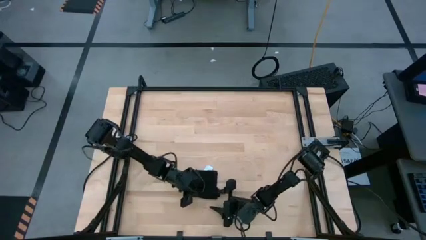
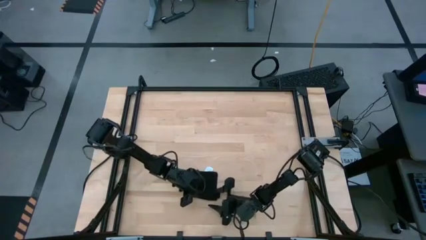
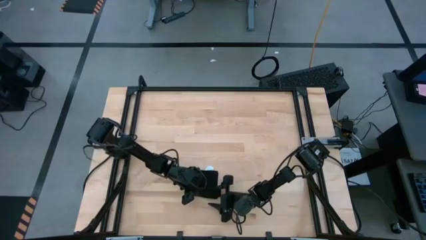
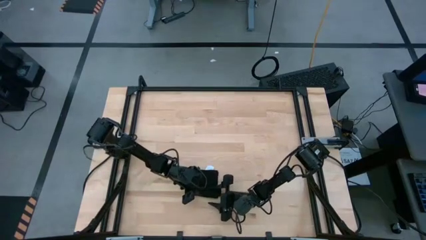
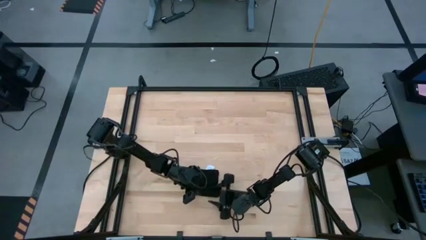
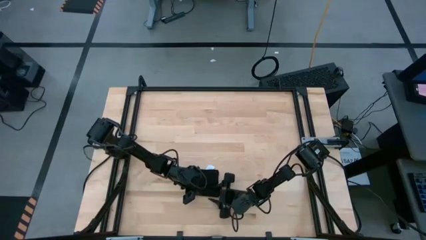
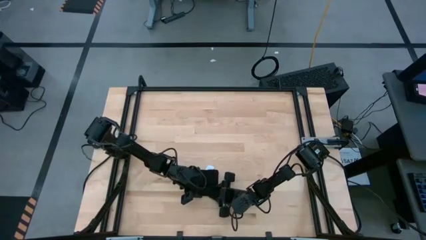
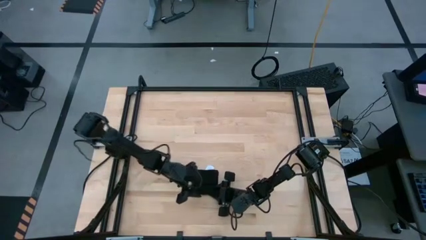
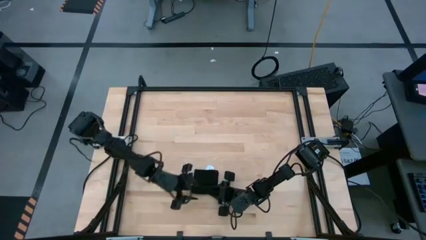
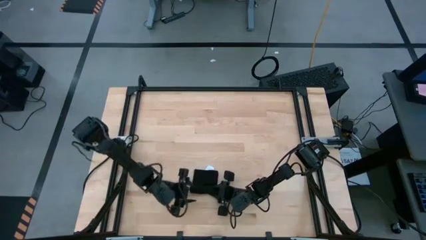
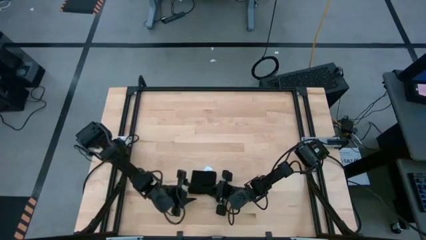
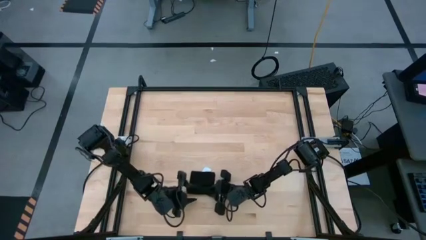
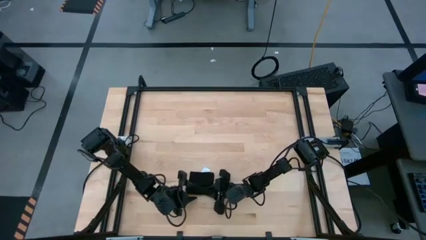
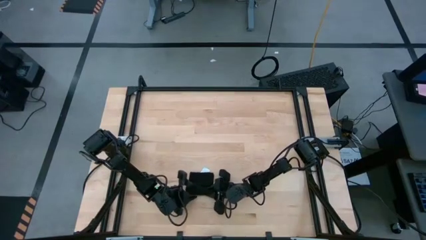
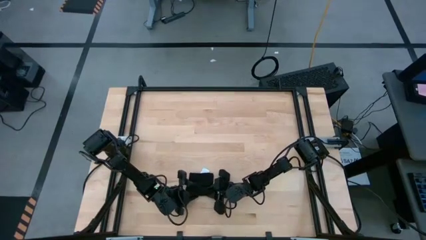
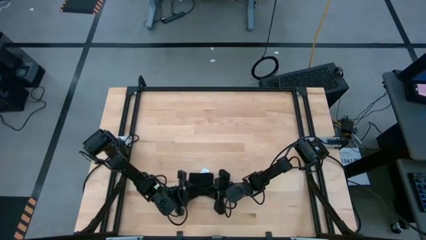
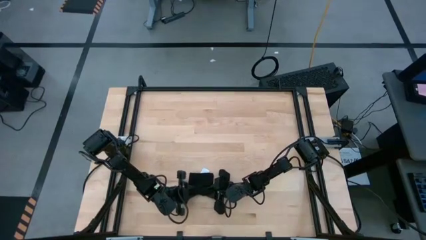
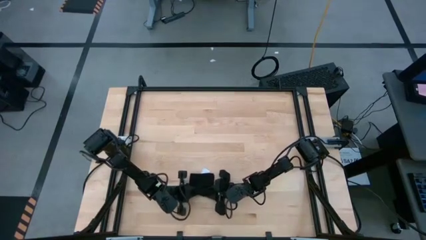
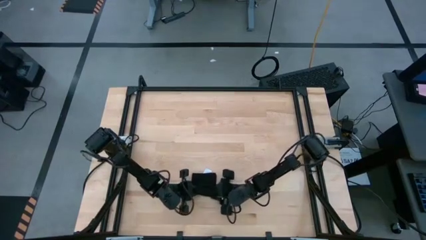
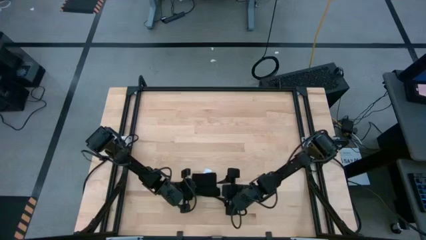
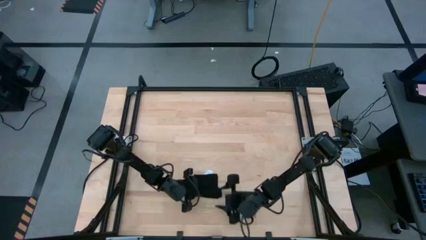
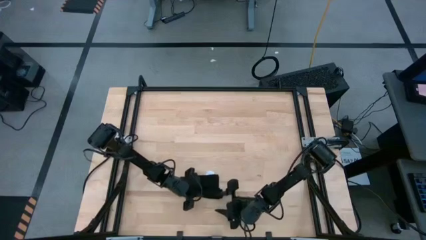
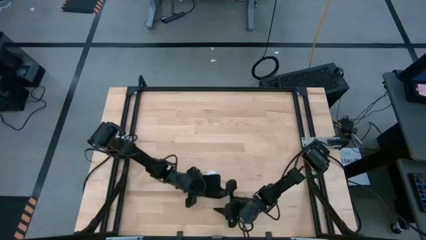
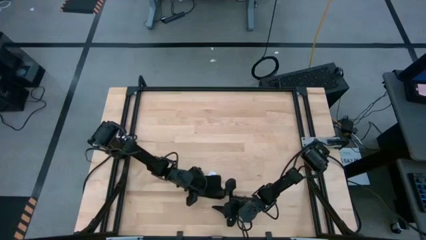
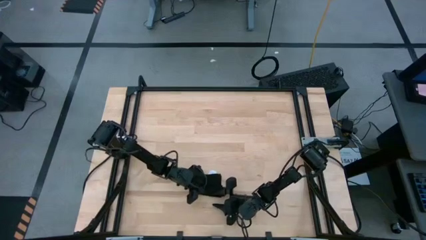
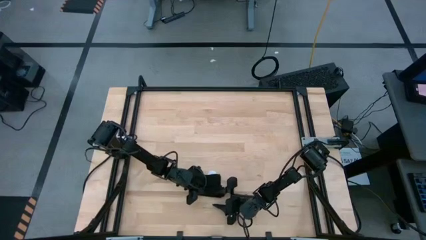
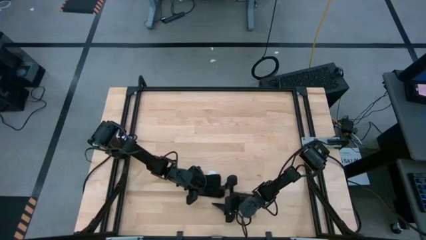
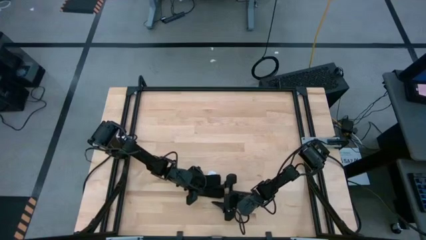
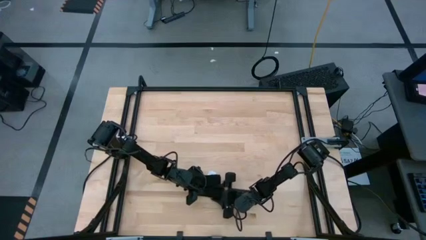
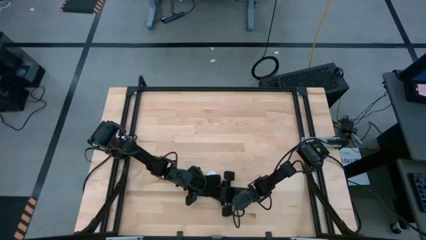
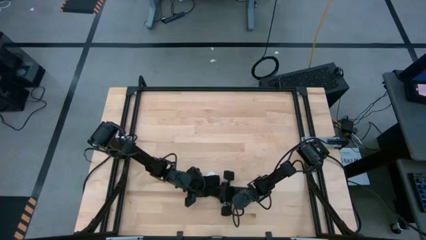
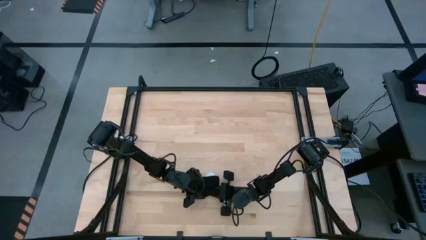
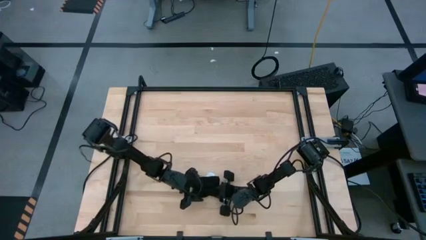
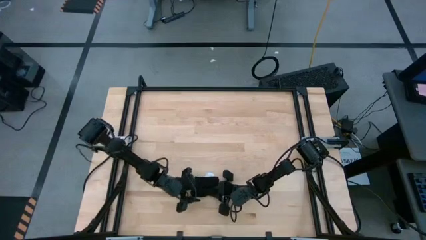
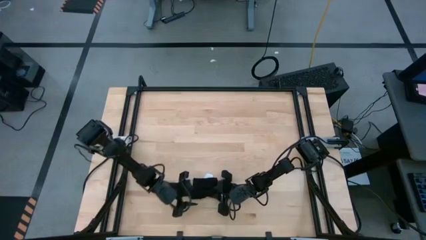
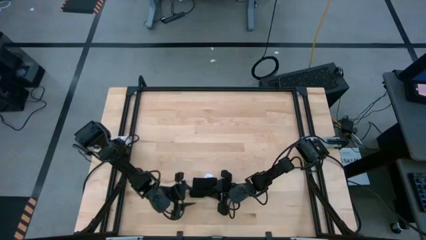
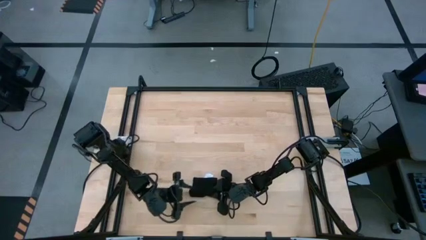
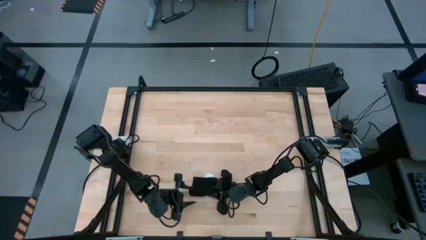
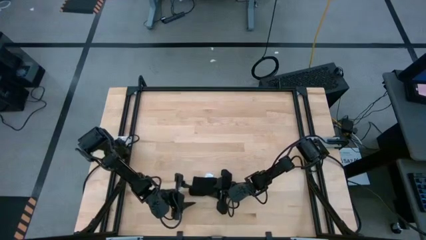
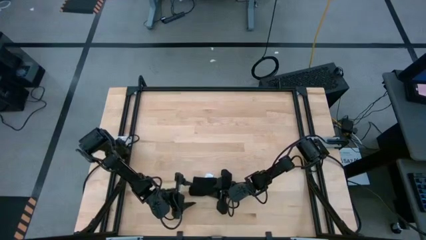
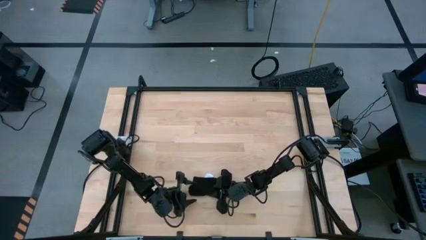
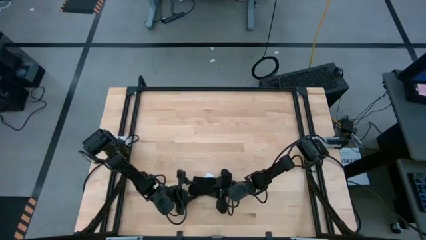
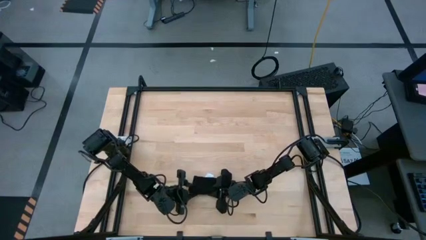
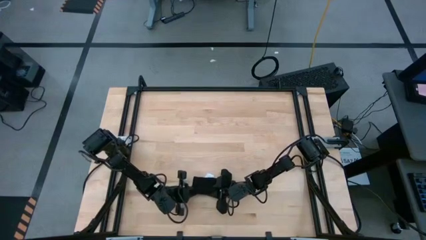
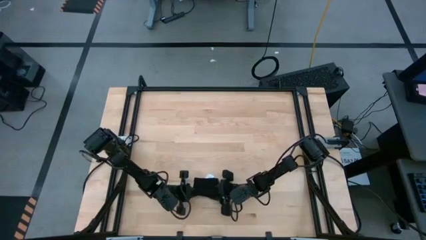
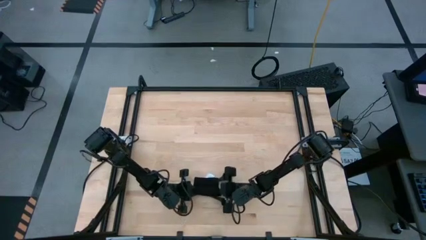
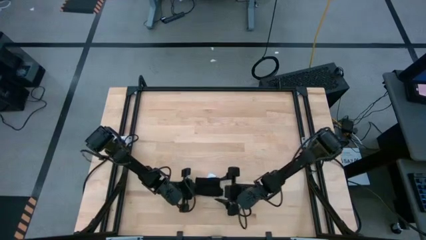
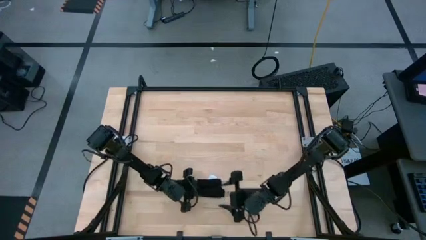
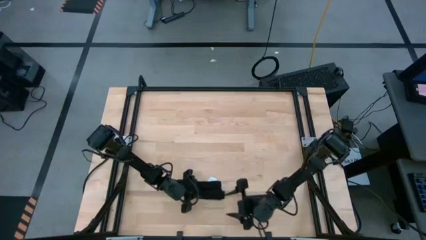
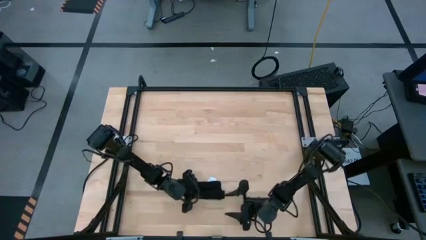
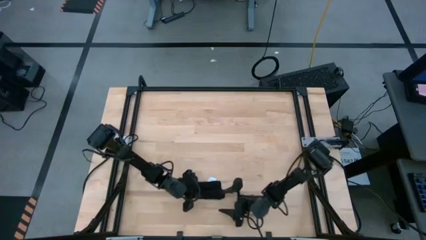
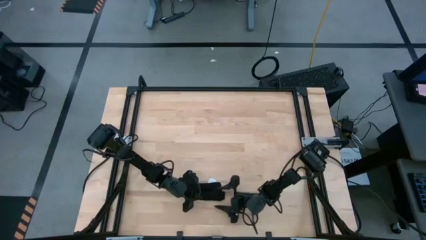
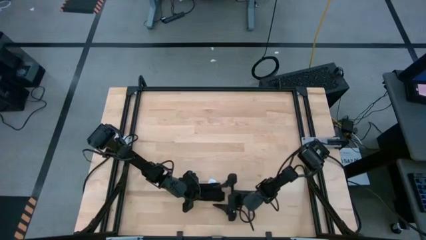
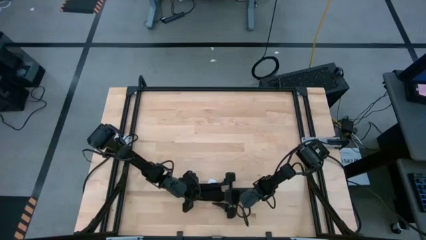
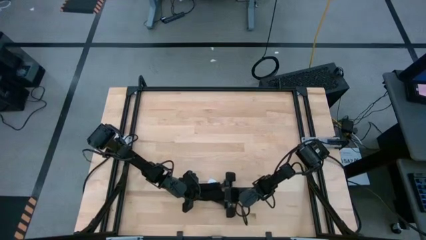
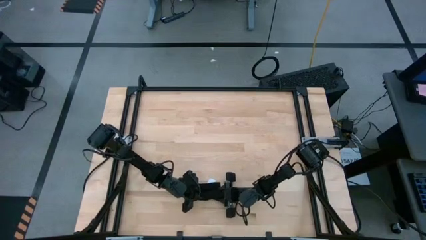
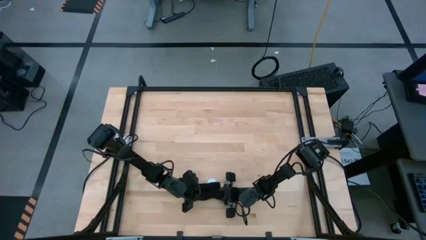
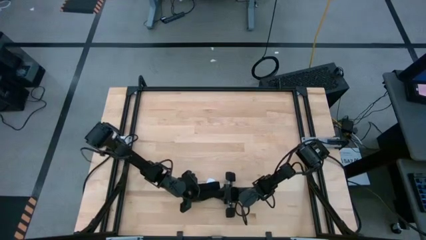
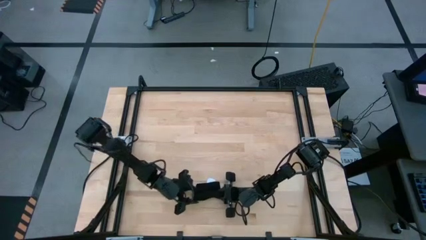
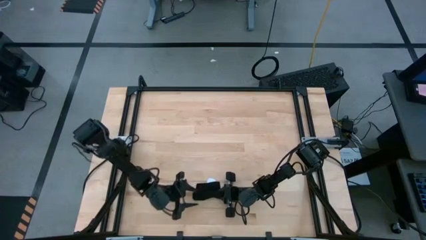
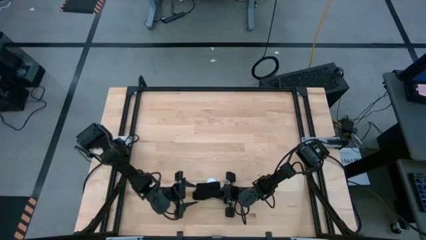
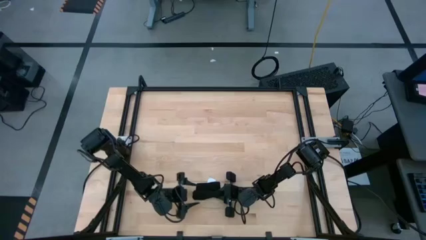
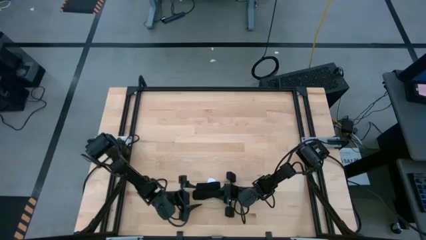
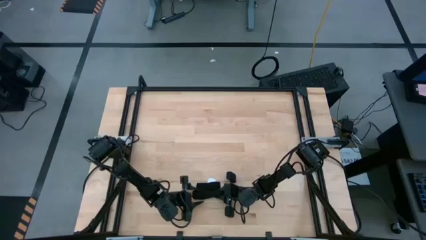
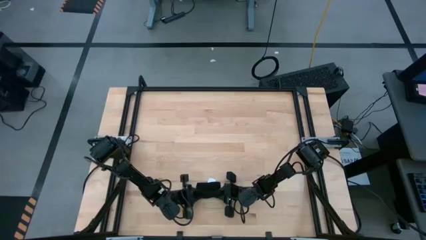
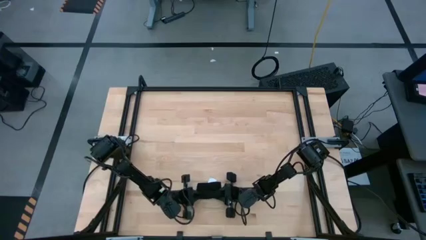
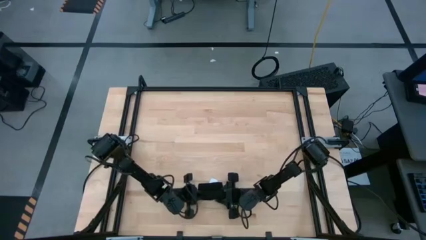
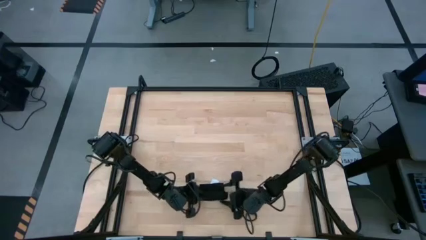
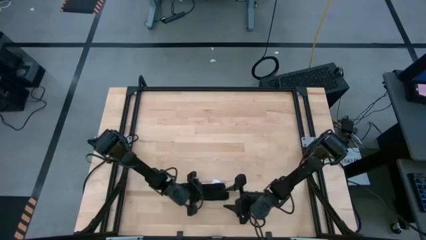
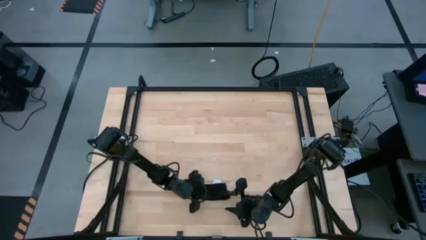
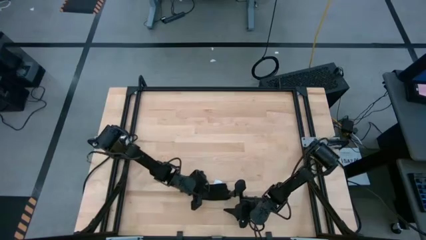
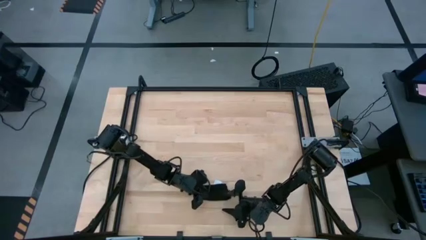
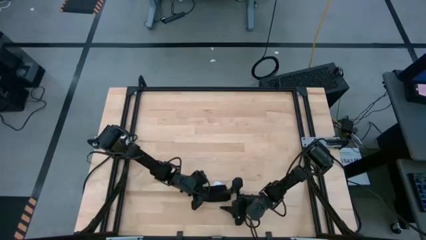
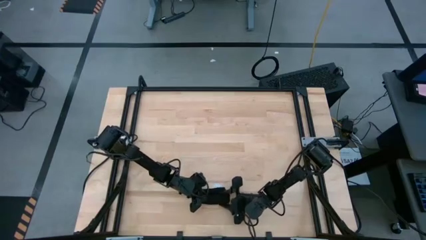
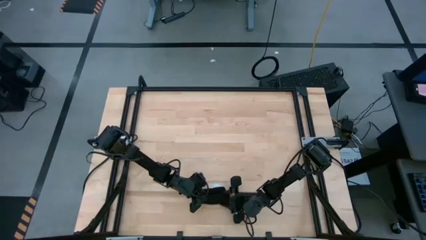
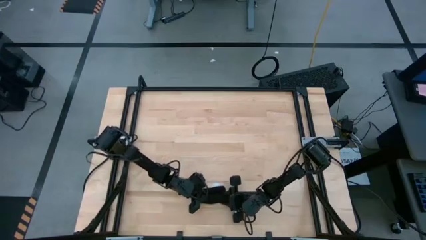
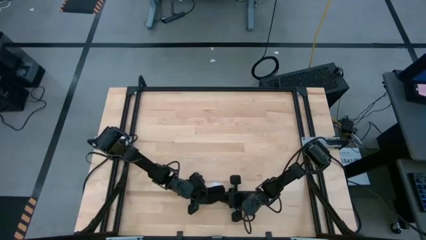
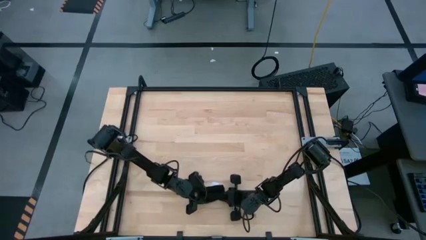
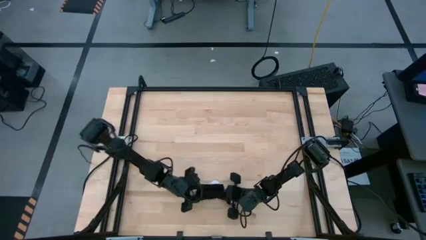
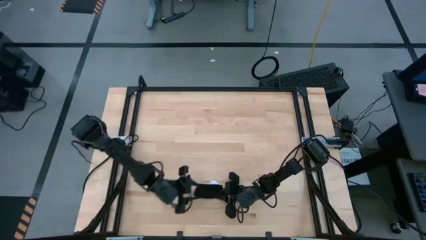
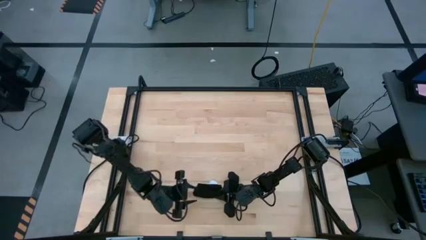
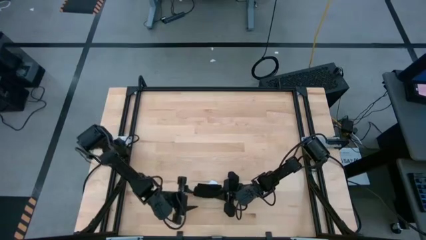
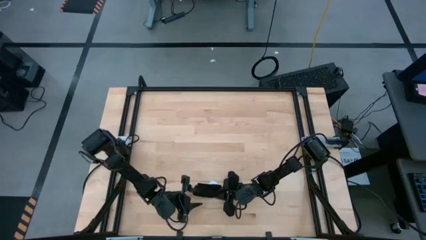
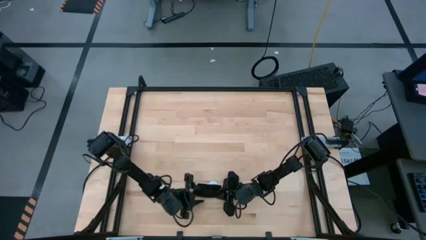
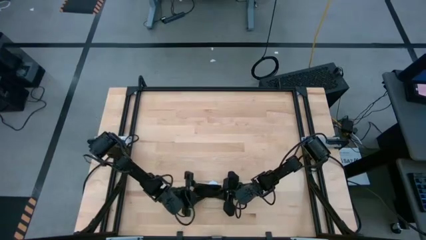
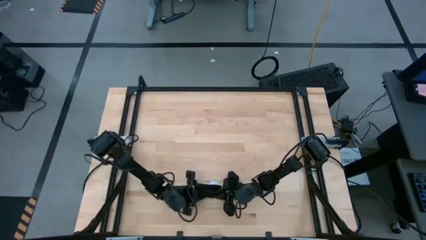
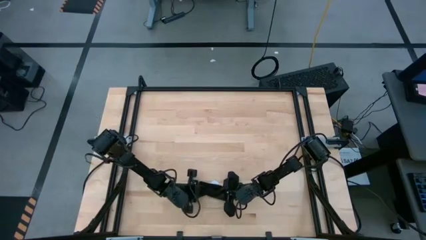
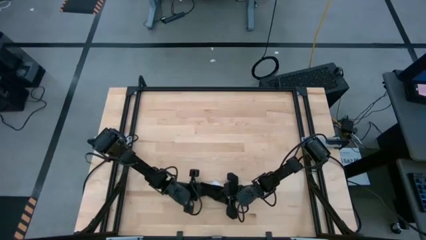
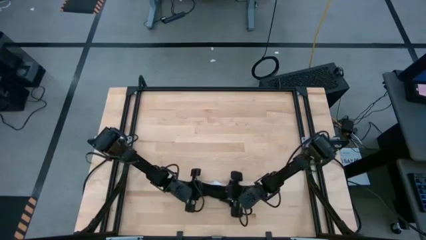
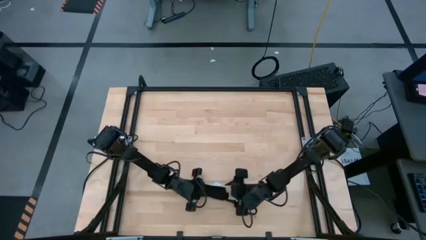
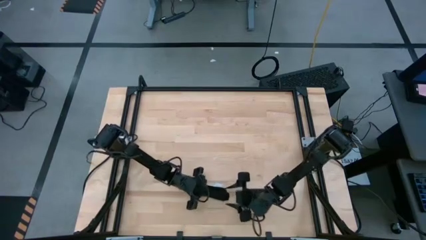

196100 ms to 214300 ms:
Task: Roll napkin
Roll the black napkin
